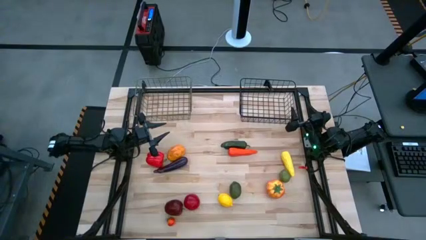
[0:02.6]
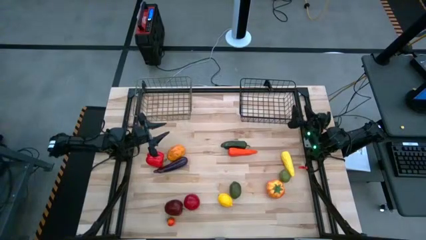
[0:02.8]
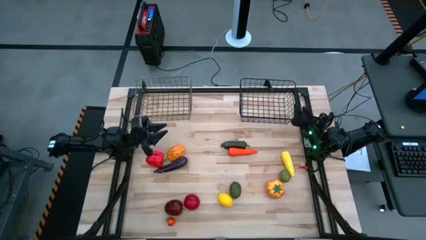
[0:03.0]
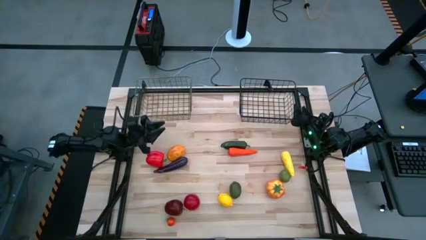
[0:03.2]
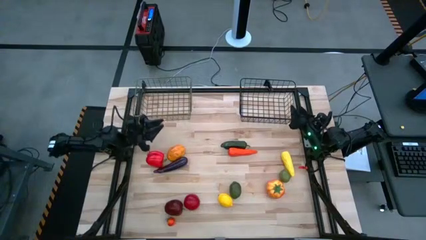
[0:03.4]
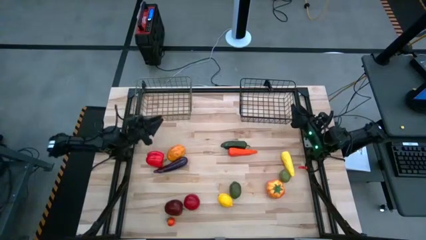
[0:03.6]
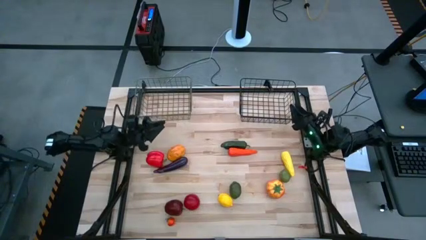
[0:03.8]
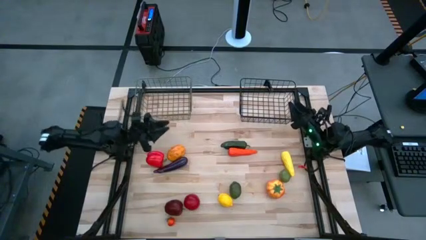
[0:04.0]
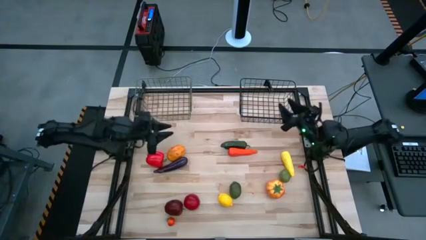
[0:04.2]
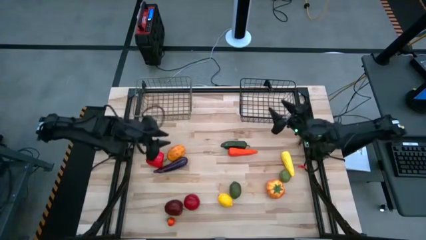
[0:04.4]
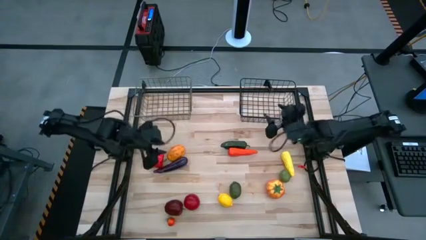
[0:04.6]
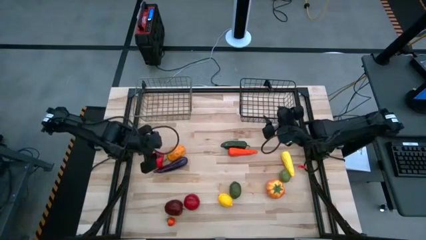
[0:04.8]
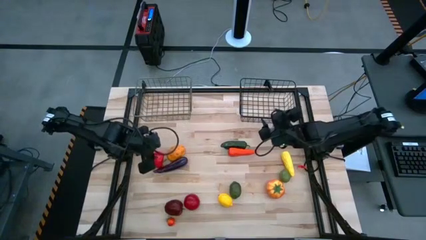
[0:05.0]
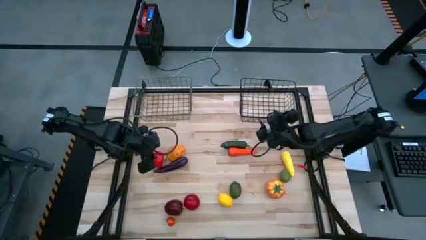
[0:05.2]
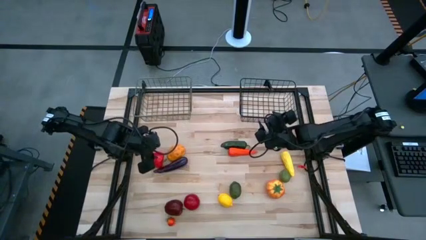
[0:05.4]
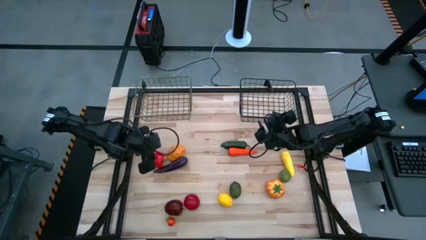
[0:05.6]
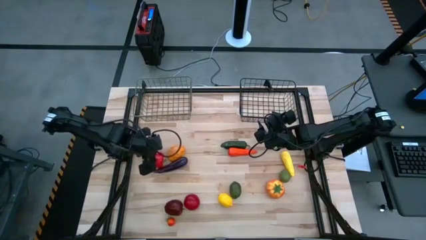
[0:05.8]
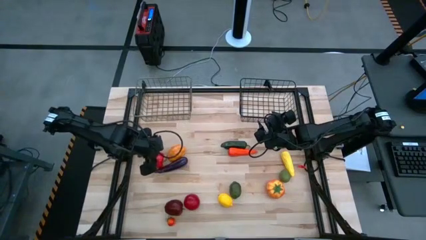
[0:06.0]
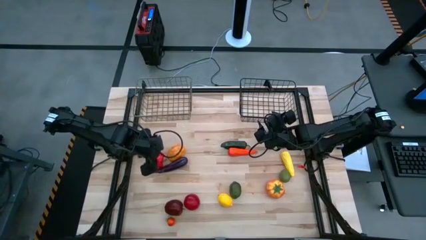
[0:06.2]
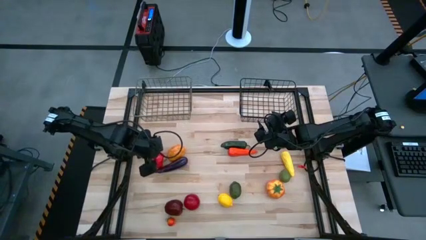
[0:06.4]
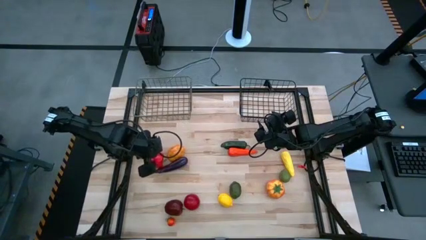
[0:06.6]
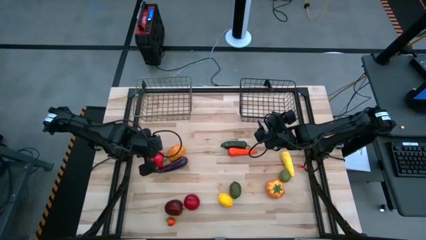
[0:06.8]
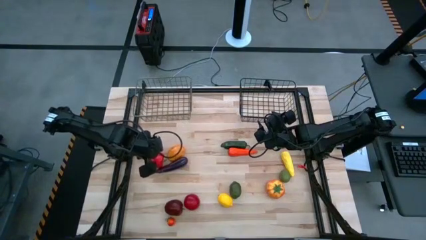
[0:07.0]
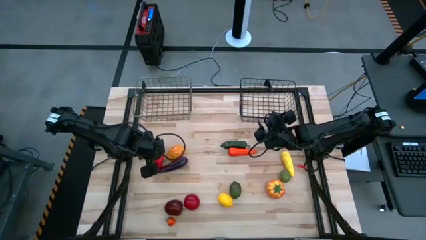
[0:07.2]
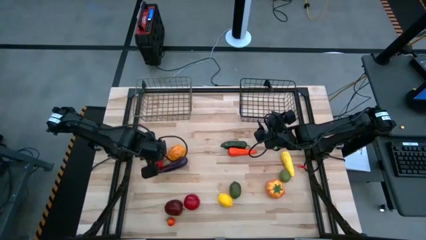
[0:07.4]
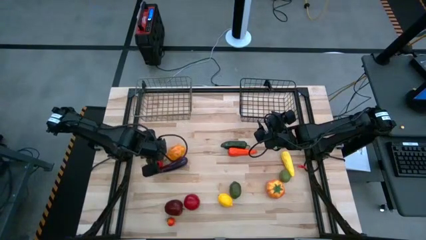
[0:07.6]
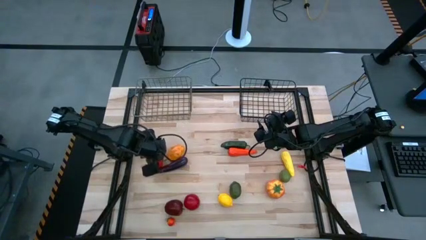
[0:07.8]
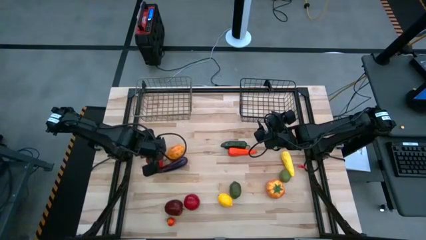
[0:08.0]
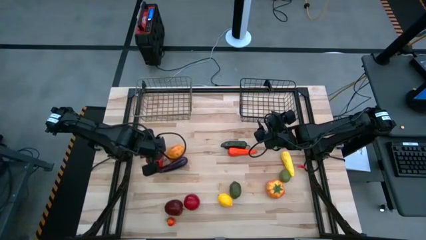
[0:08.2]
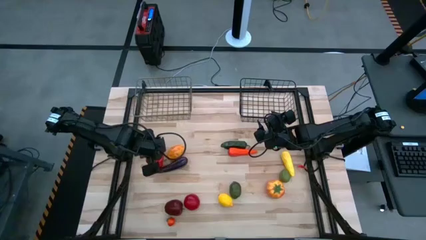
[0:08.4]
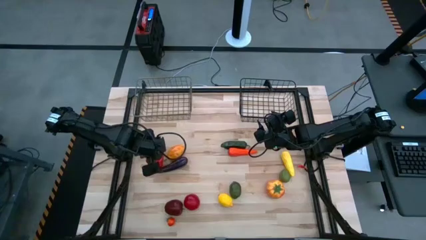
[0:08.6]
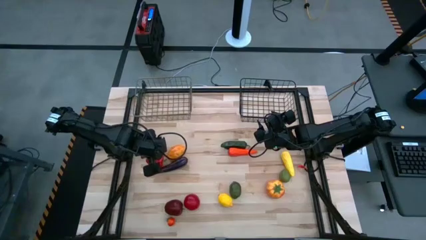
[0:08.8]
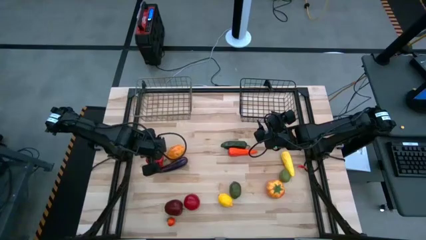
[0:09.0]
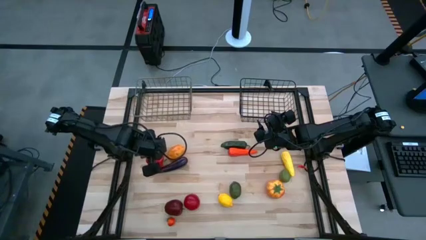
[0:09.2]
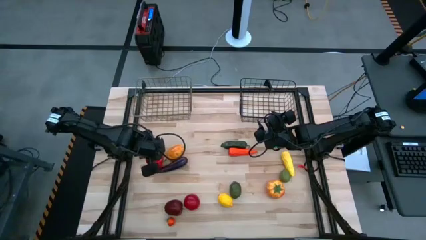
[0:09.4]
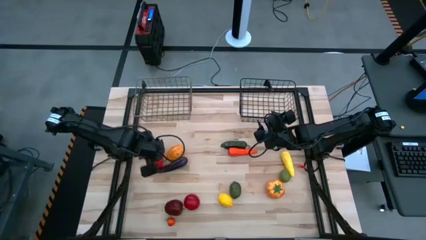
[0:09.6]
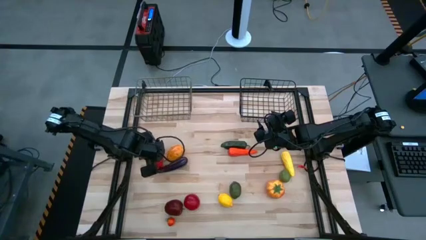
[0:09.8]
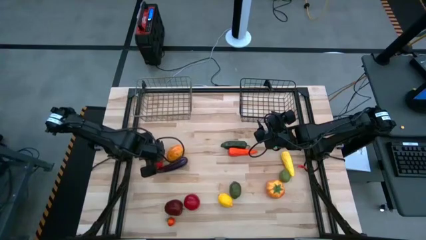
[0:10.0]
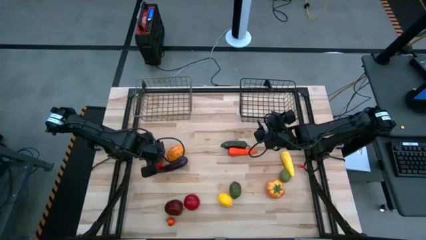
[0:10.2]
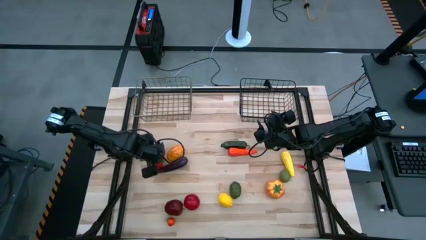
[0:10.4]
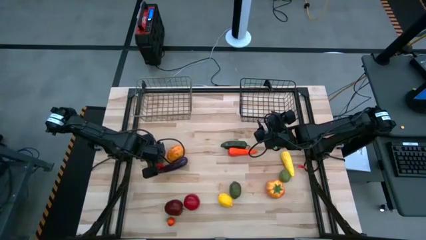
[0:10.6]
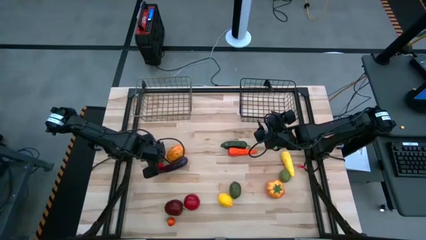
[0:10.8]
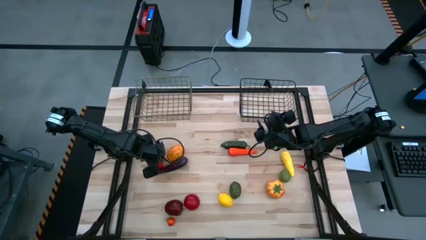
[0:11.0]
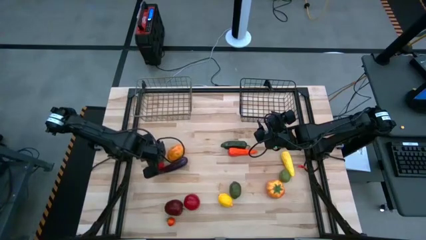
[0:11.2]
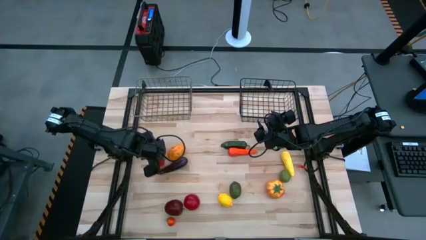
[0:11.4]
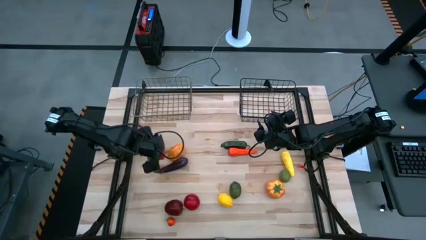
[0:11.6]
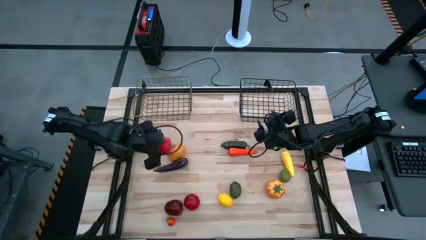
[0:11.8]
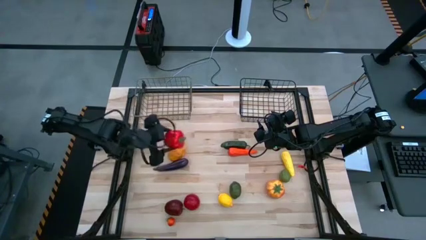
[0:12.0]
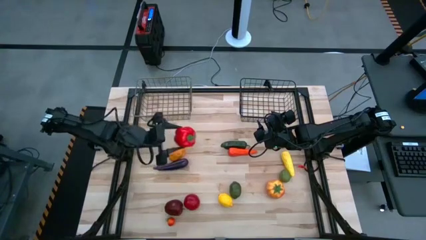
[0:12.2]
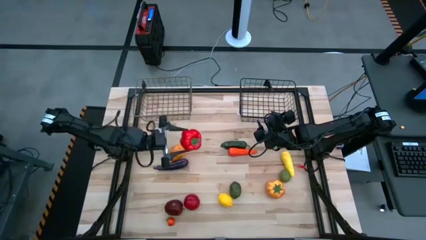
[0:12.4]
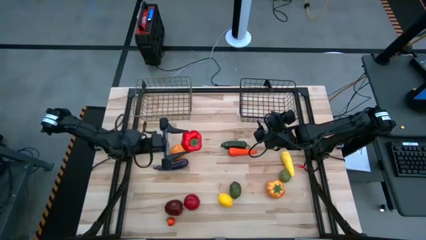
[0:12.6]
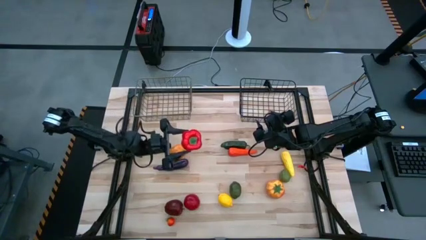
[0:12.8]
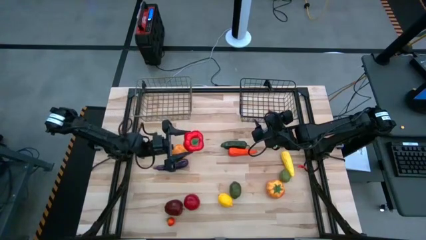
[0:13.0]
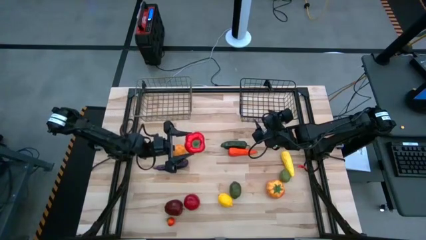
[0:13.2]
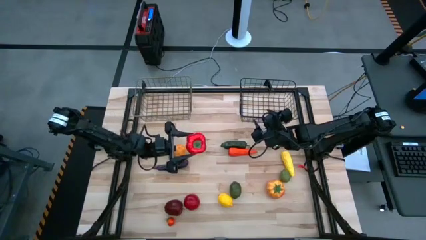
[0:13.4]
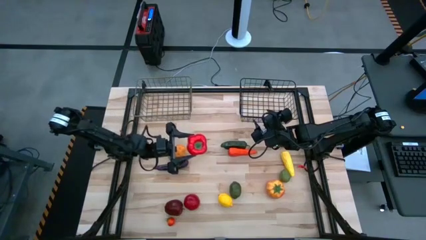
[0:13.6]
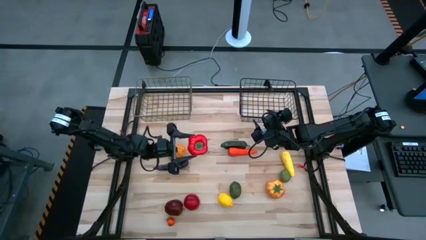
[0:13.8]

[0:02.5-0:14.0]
Task: Sort produce into baskets
Put the bell pepper into the brown wire basket
